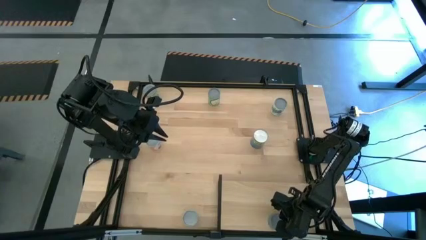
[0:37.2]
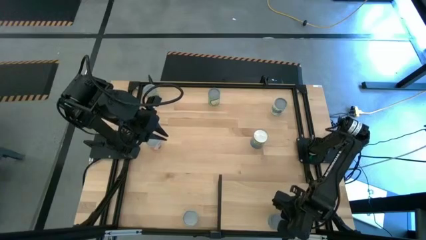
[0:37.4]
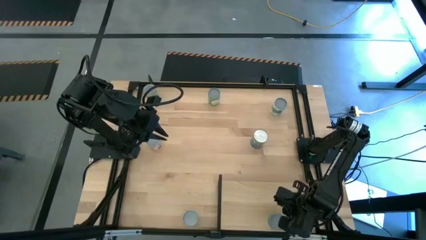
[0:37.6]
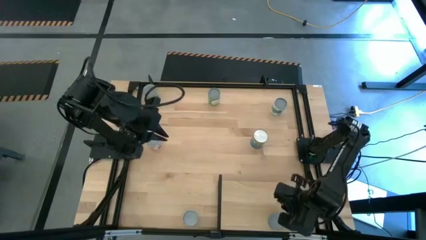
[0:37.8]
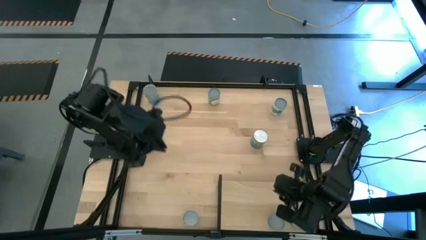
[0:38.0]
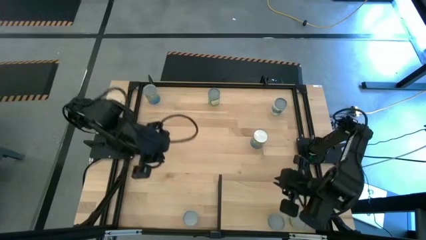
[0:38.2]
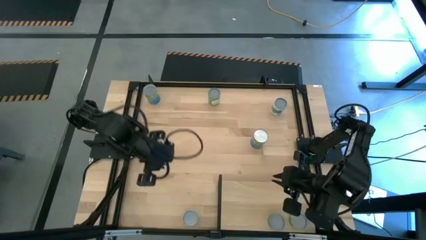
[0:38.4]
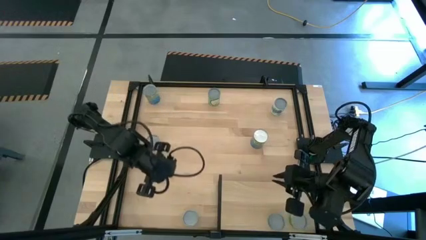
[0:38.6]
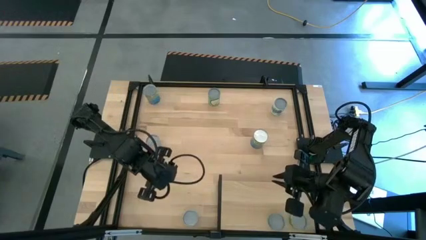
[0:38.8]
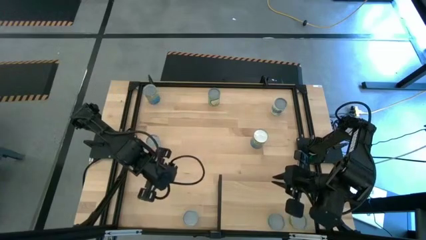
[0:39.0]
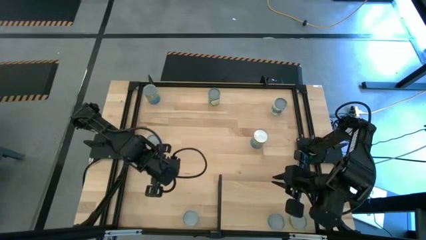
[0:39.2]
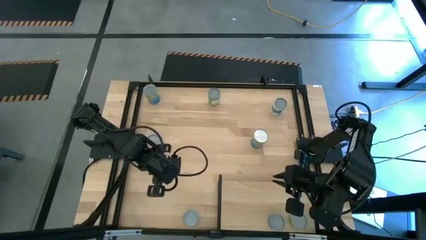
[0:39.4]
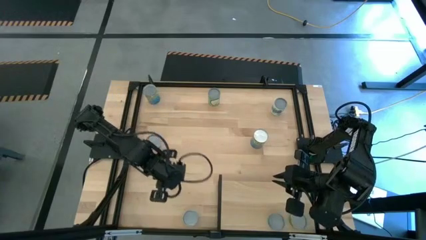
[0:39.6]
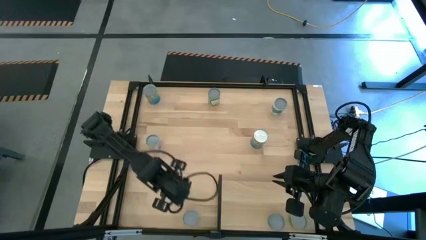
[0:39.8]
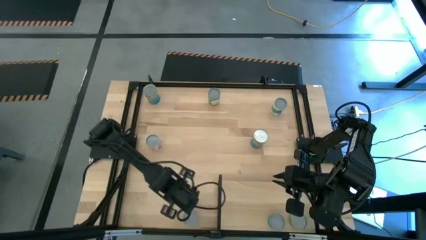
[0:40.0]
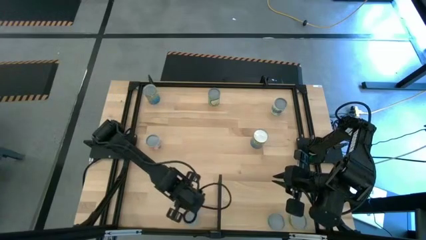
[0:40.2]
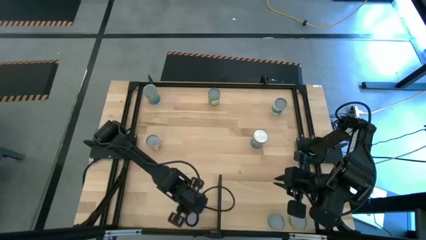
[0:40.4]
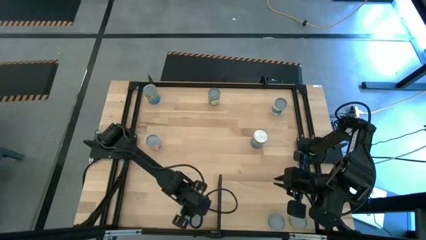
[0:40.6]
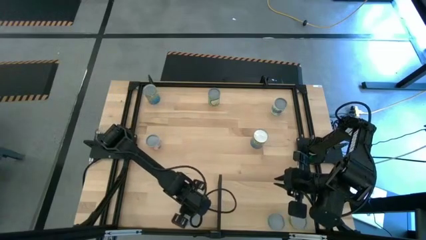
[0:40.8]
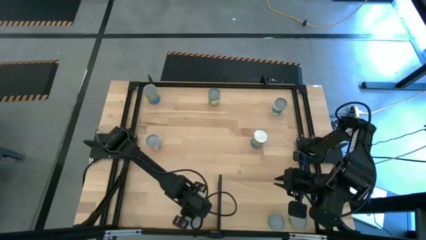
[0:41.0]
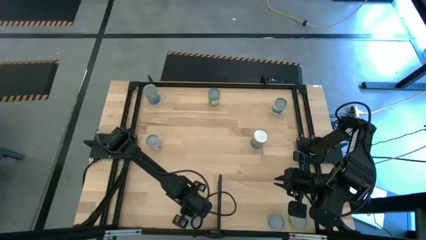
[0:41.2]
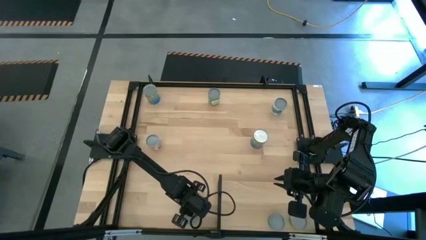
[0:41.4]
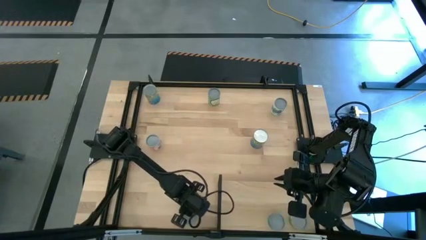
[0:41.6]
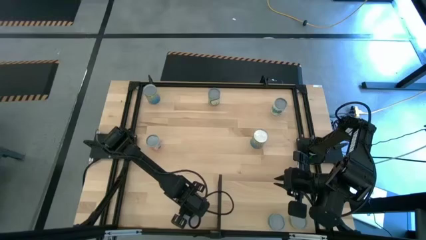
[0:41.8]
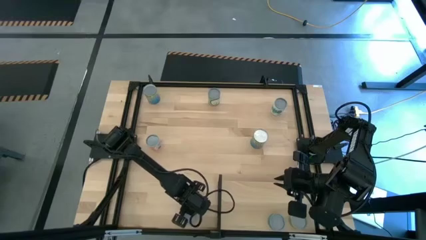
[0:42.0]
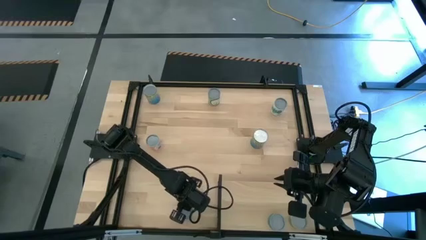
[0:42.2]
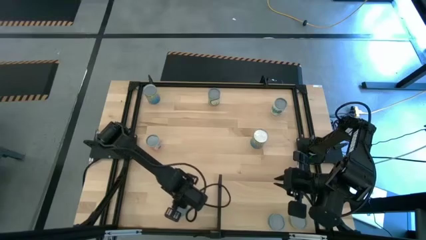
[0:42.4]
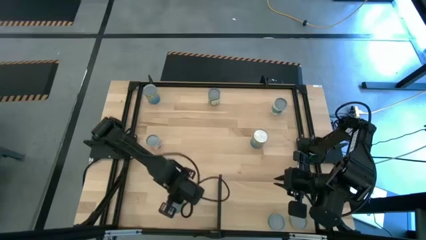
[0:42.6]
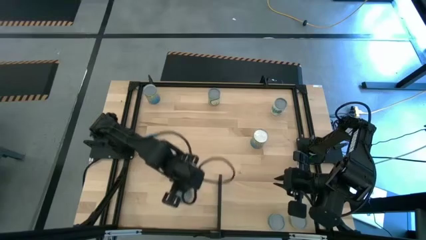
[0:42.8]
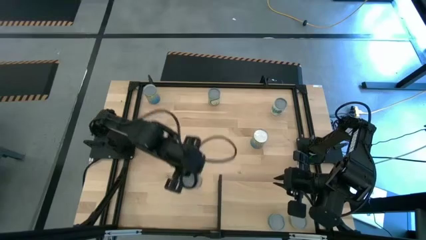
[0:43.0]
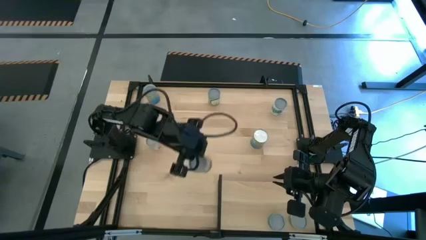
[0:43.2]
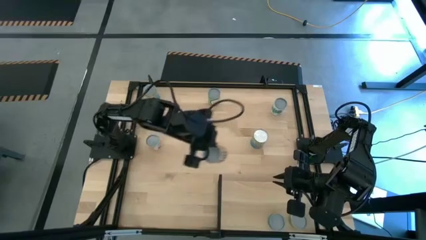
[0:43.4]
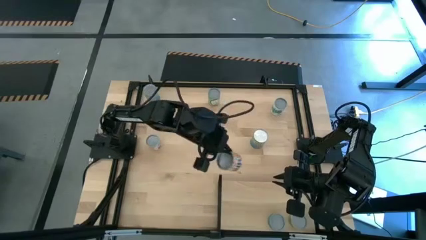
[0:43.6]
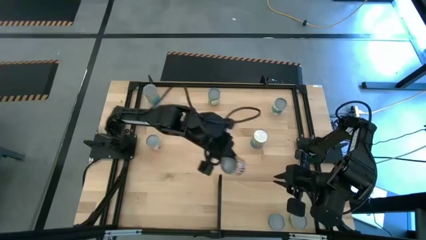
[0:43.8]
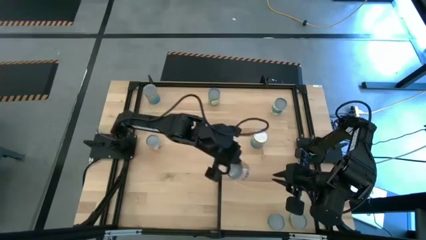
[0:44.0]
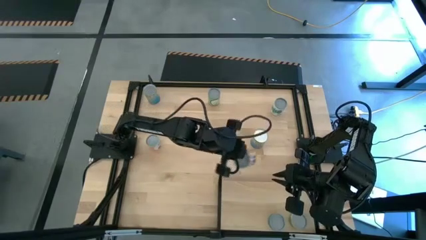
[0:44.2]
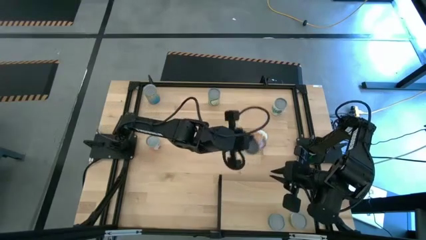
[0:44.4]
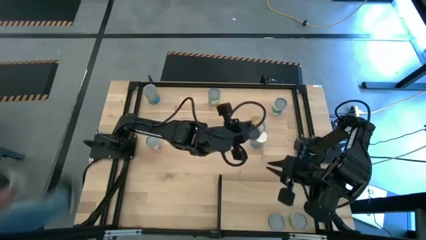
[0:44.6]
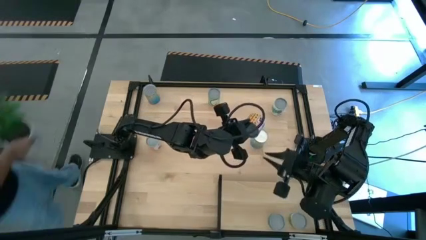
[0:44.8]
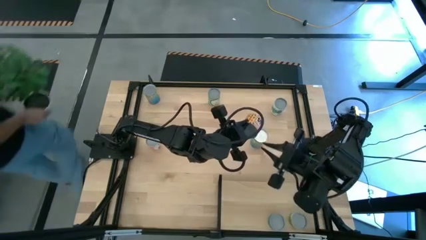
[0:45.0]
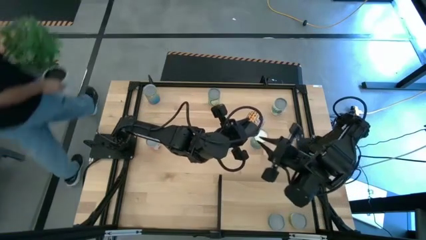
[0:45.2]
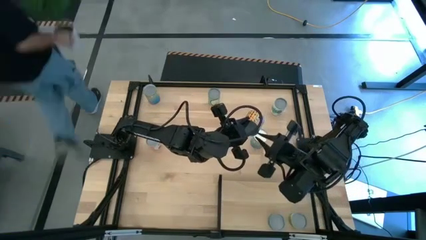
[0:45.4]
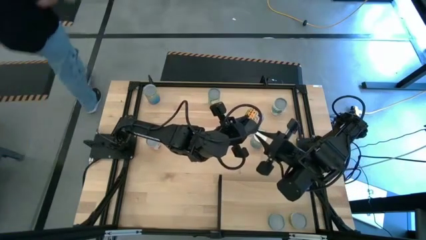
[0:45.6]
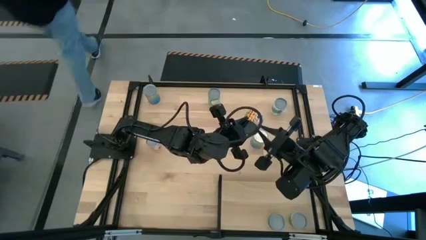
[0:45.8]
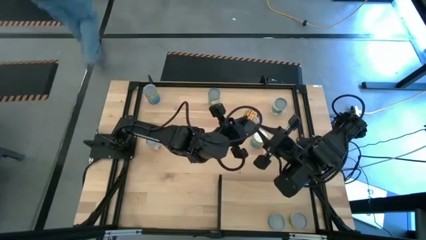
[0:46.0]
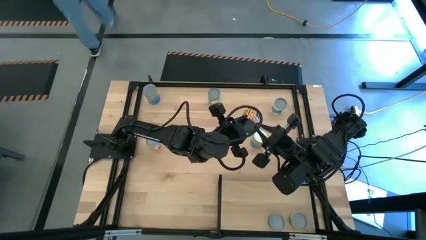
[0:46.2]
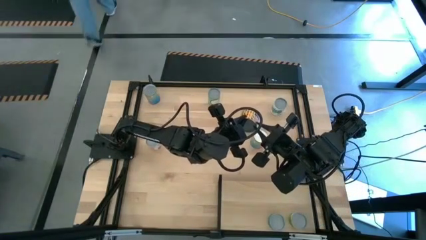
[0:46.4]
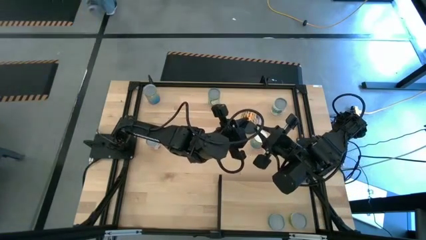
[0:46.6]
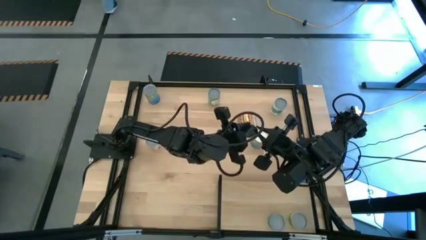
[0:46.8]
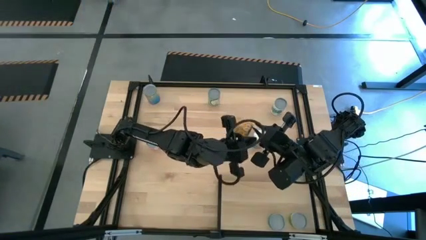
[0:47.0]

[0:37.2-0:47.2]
Task: Pick and place cans onto a shelf
Put the canned black beans on the shelf

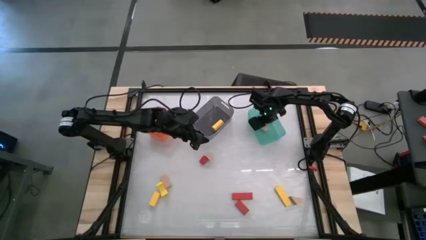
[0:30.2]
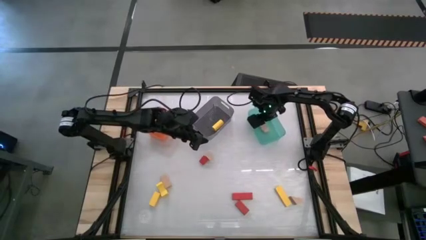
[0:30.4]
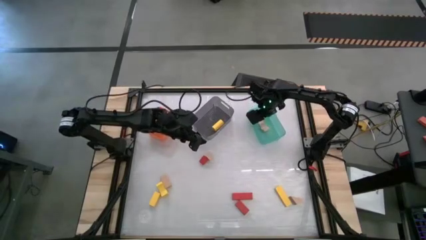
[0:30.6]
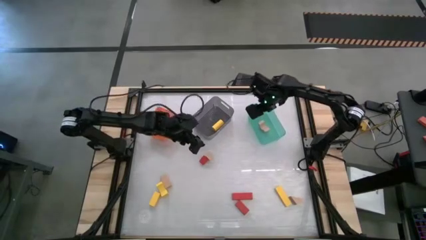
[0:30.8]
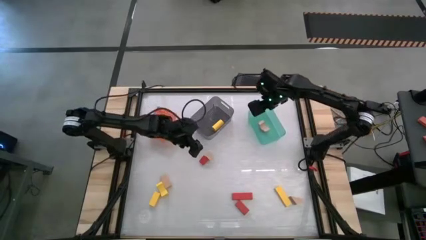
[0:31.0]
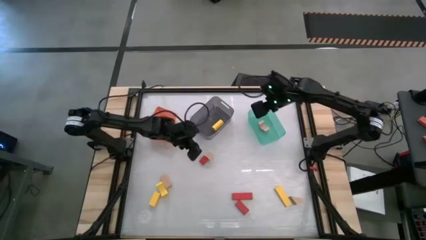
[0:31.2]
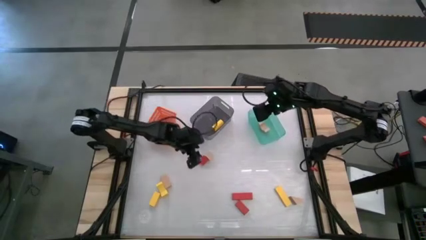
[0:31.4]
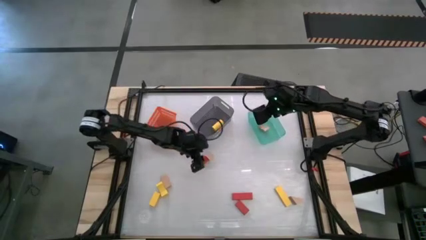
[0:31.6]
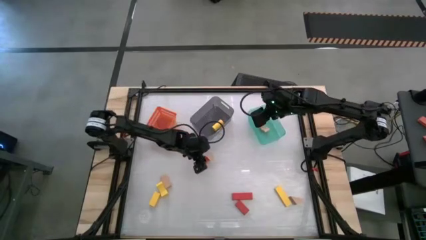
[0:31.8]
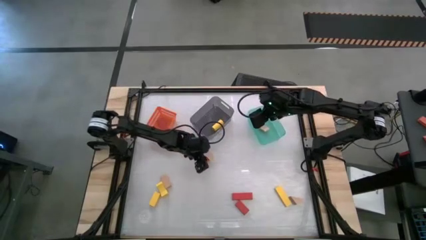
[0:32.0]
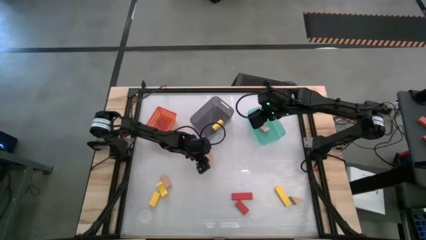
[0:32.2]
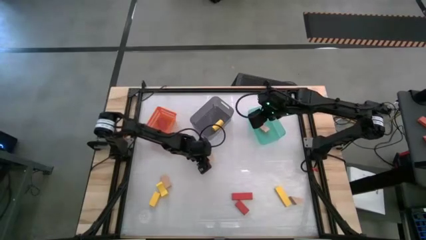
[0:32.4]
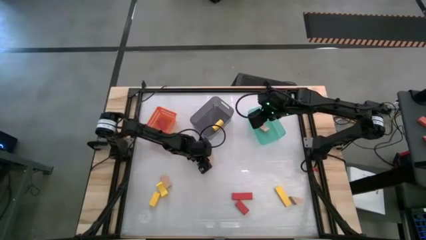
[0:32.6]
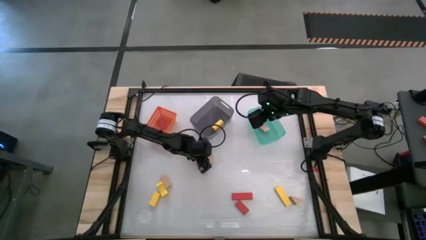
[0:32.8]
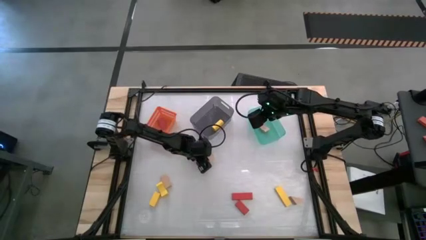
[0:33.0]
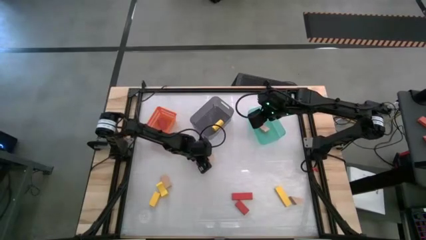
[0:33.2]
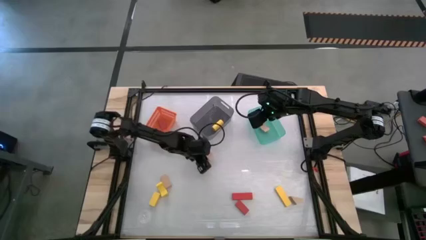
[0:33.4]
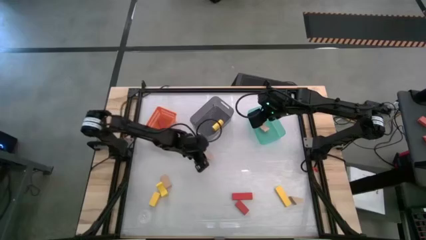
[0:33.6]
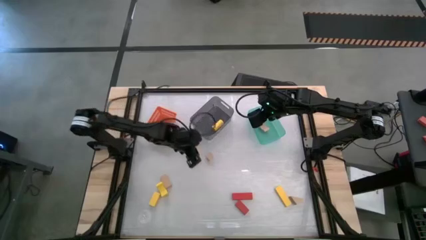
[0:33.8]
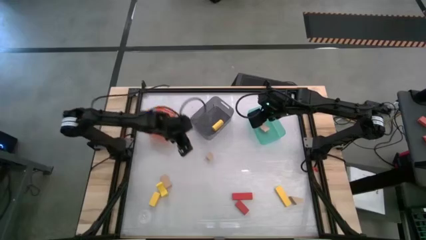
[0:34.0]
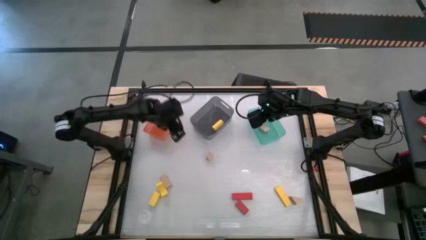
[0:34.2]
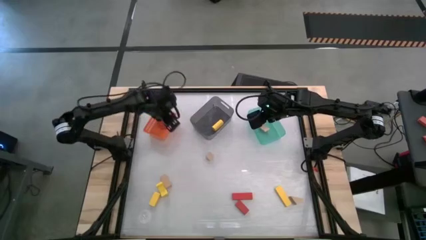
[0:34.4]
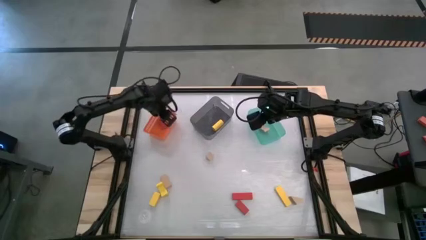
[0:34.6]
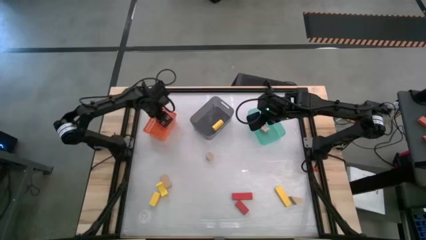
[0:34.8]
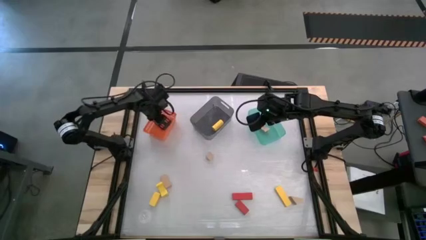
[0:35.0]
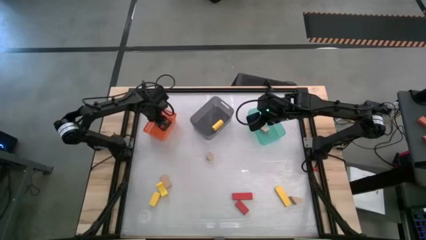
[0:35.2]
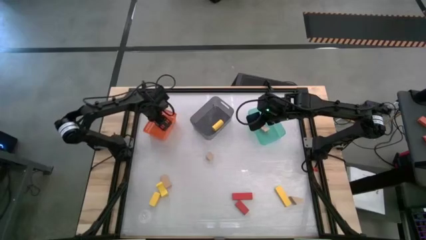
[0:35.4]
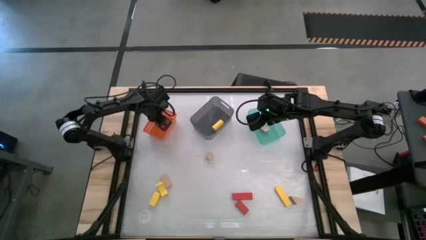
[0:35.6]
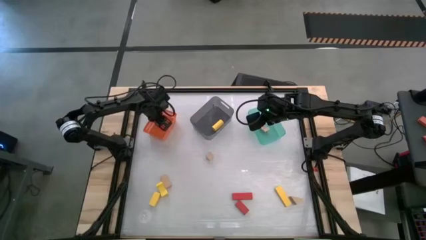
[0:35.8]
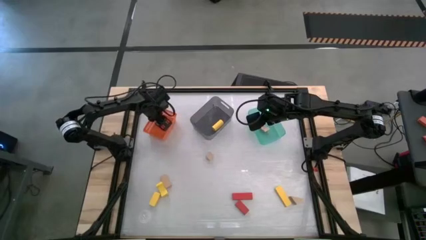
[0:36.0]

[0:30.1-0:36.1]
Task: Sort & place blocks by color
Put the red block into the orange bin
